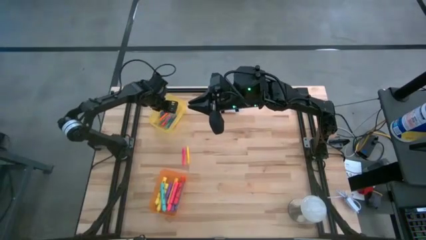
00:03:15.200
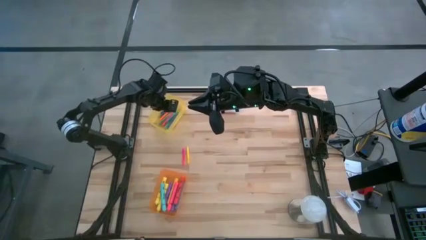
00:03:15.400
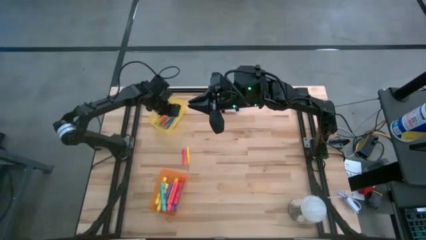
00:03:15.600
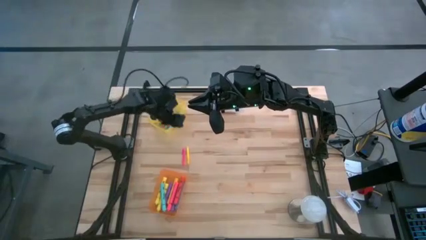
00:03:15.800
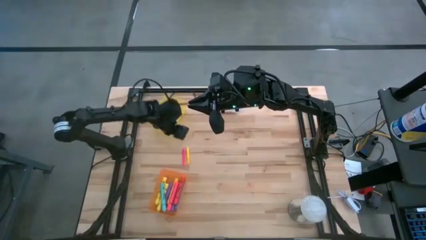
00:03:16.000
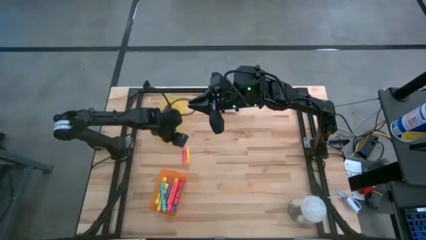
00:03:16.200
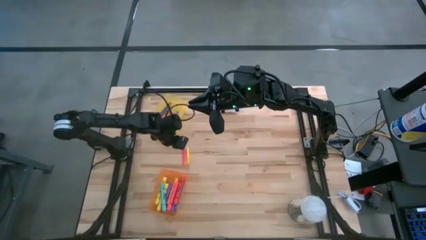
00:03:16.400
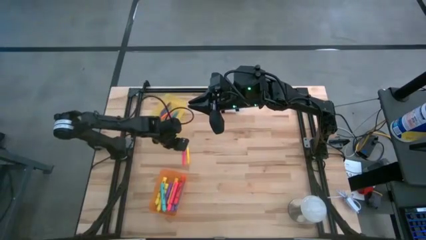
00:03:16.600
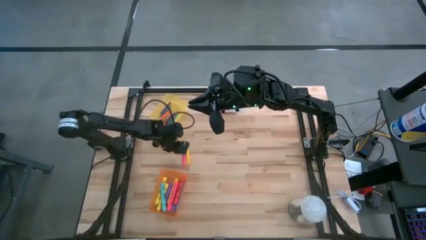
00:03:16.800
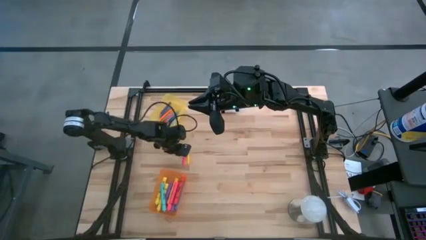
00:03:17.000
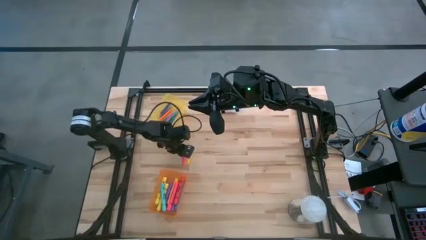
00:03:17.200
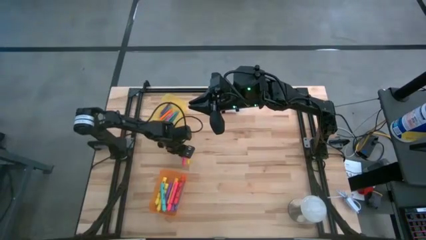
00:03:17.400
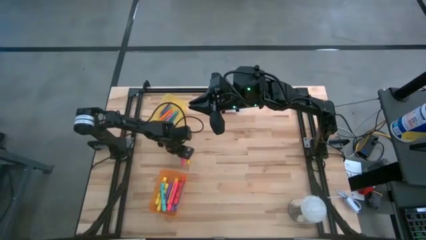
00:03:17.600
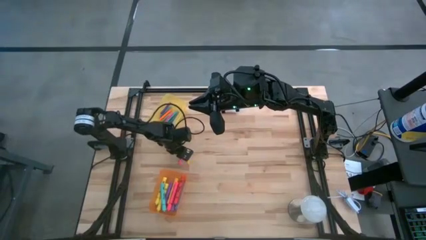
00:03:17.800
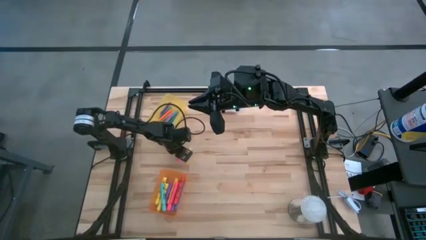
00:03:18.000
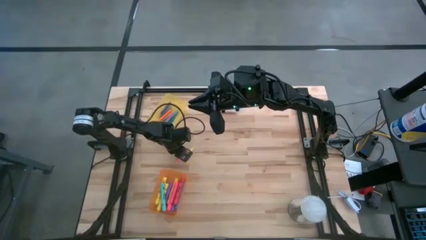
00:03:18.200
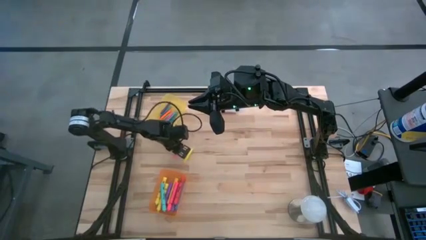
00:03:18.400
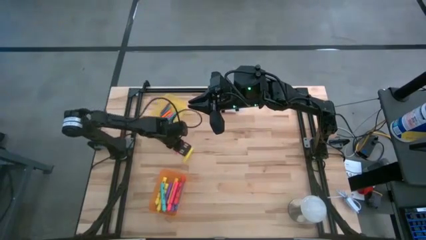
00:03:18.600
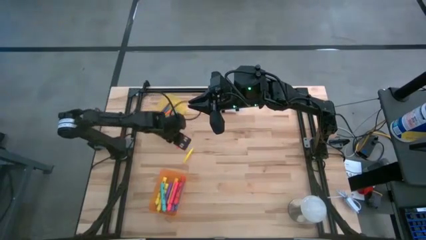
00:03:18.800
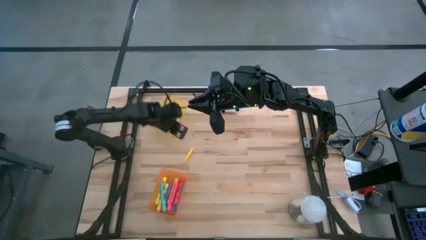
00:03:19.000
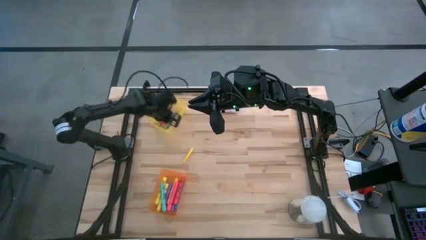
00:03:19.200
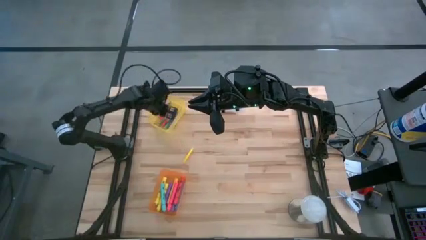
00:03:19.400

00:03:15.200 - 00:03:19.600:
Task: Pick & Place Markers
Put the pink pen into the yellow bin

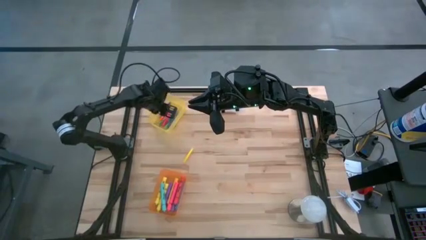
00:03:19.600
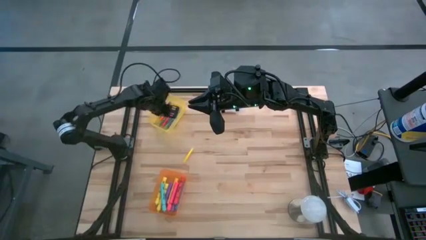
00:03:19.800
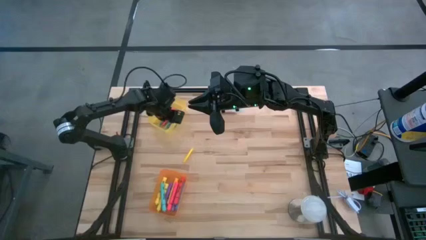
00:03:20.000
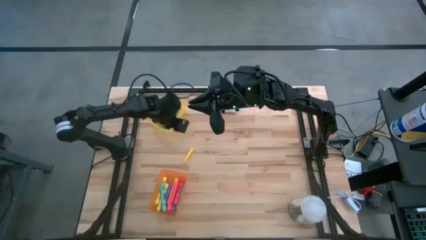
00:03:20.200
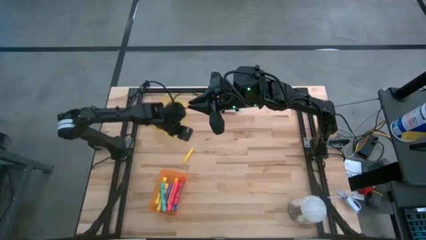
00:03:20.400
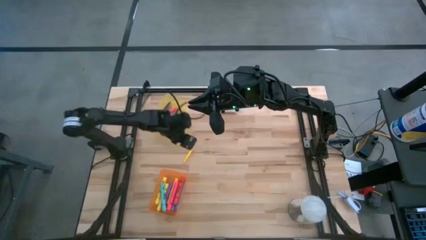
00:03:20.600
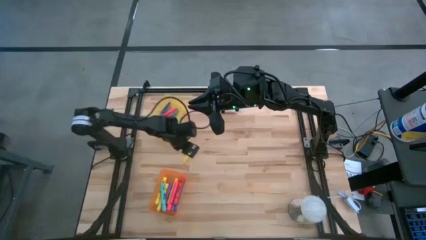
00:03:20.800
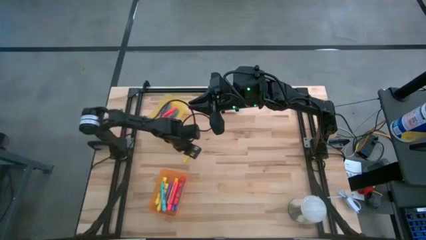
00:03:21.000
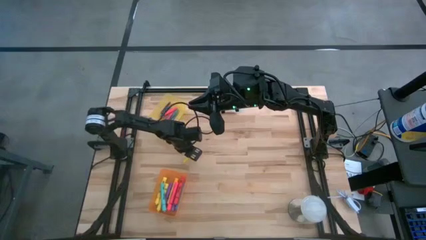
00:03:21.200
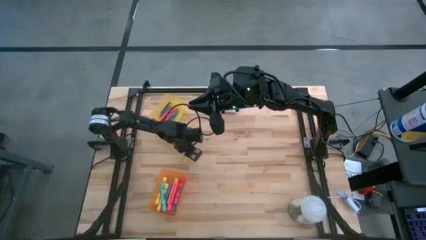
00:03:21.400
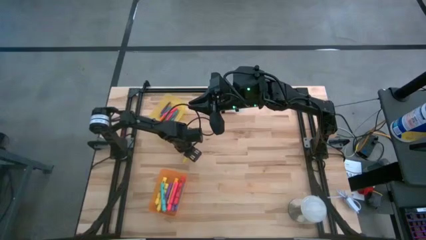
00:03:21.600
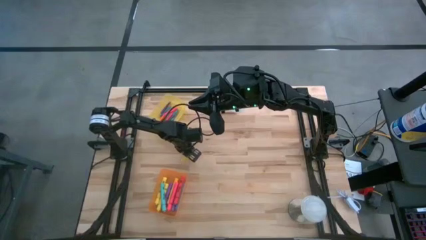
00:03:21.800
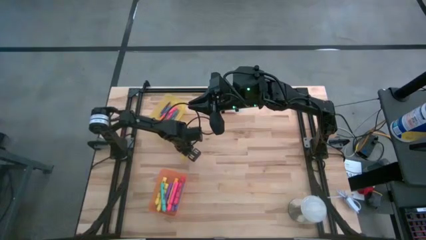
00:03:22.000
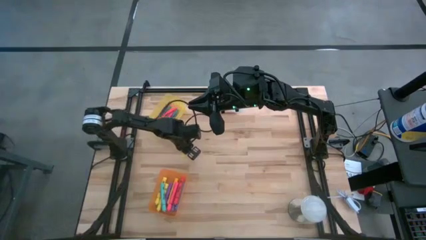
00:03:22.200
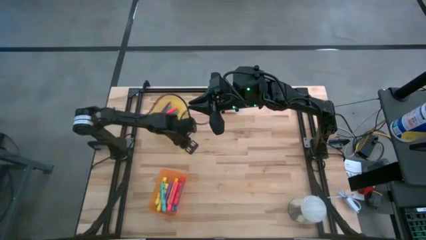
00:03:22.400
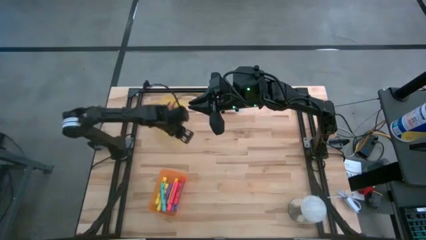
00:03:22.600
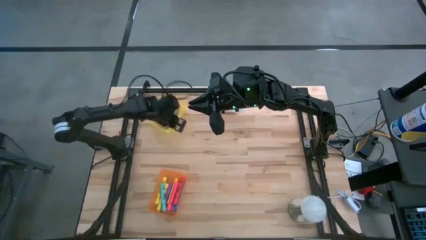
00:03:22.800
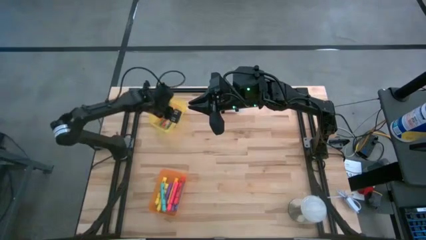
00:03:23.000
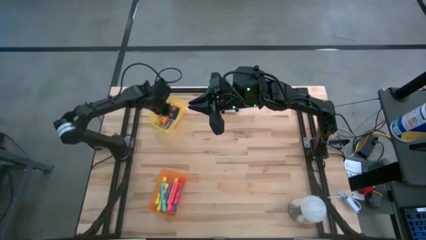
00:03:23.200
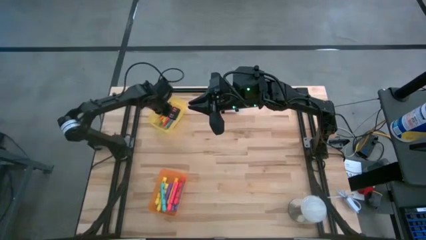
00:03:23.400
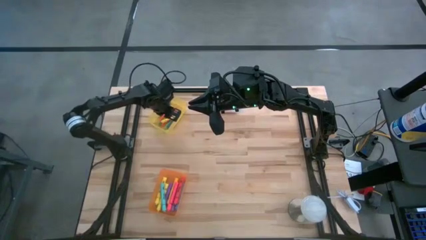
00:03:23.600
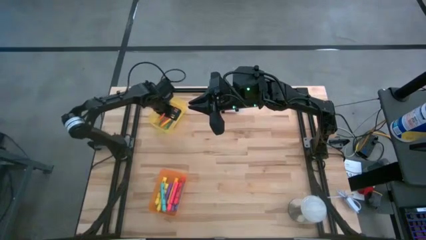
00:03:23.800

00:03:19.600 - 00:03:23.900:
Put the yellow pen into the yellow bin

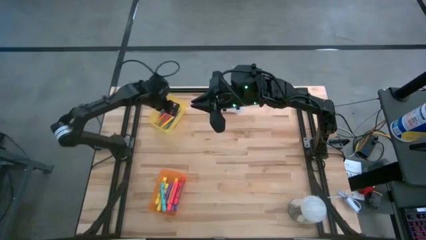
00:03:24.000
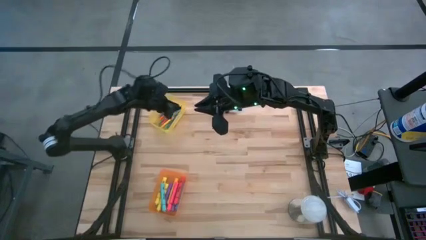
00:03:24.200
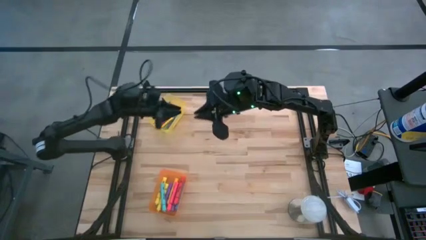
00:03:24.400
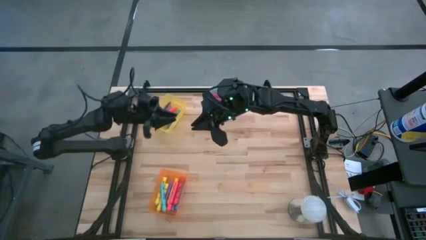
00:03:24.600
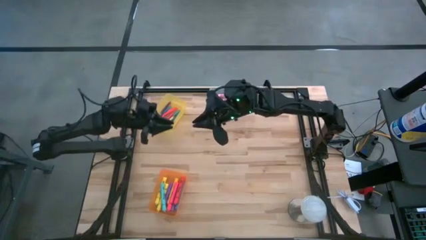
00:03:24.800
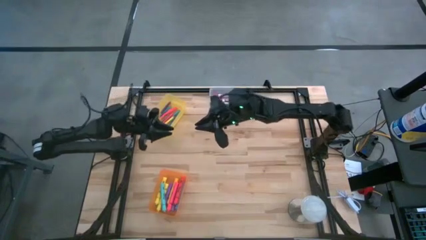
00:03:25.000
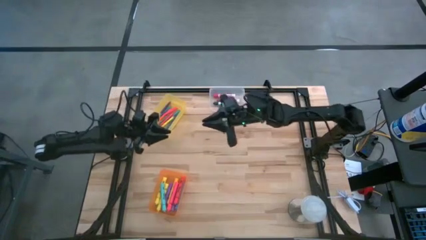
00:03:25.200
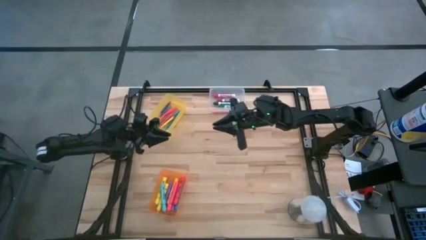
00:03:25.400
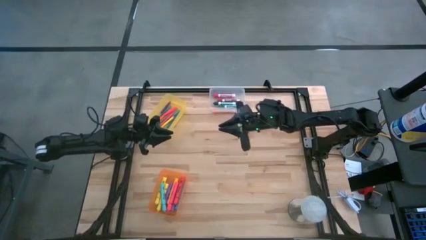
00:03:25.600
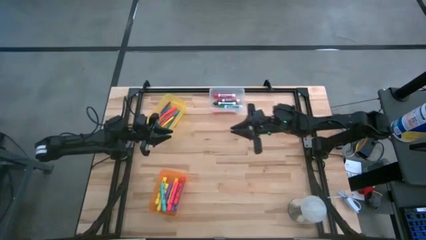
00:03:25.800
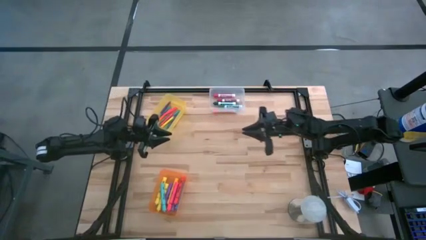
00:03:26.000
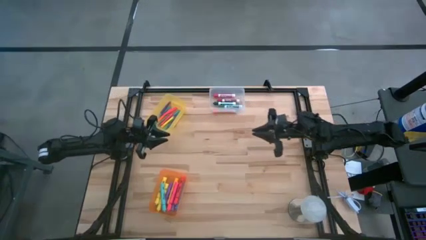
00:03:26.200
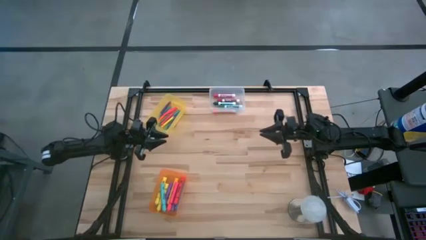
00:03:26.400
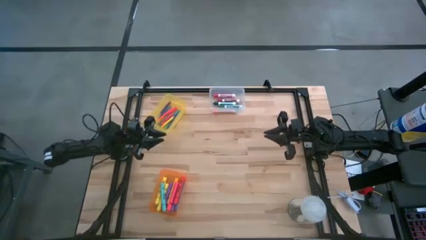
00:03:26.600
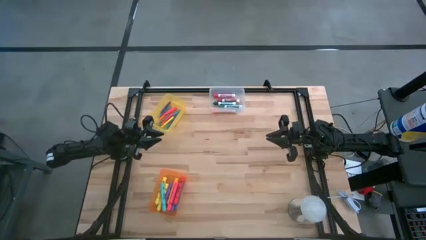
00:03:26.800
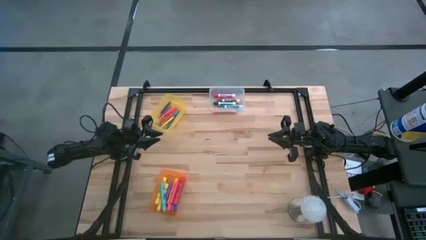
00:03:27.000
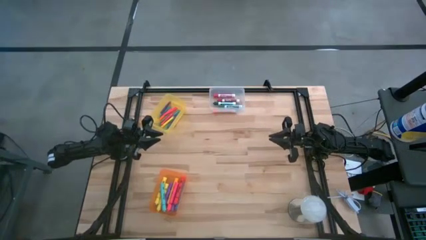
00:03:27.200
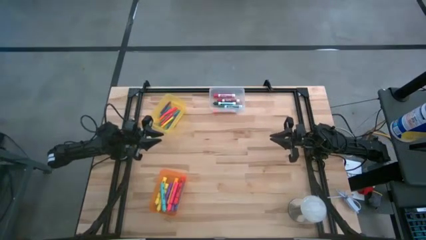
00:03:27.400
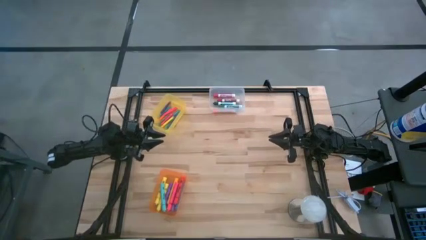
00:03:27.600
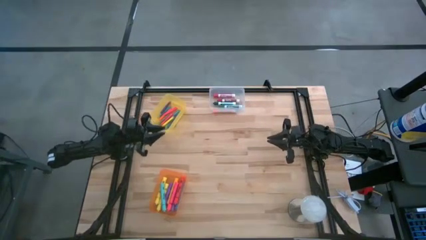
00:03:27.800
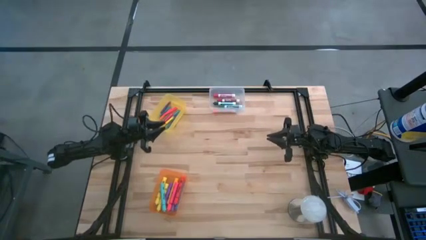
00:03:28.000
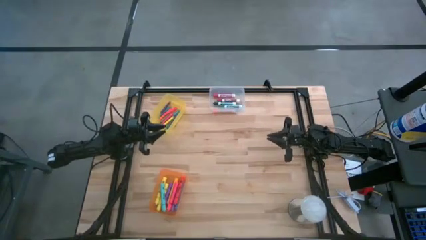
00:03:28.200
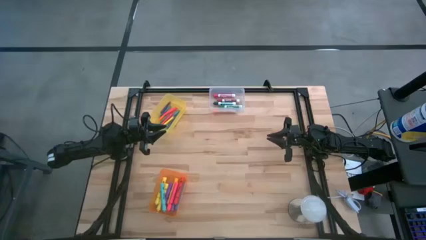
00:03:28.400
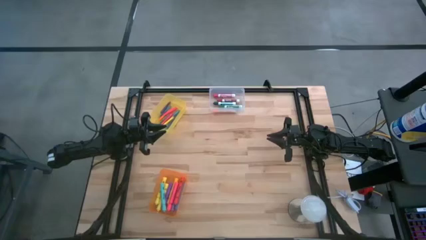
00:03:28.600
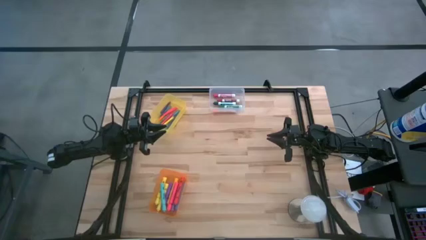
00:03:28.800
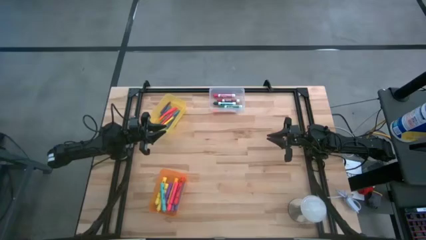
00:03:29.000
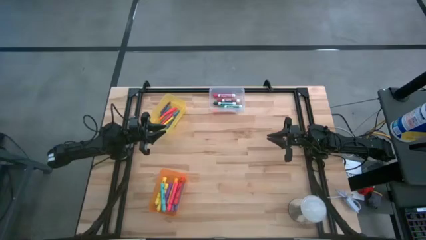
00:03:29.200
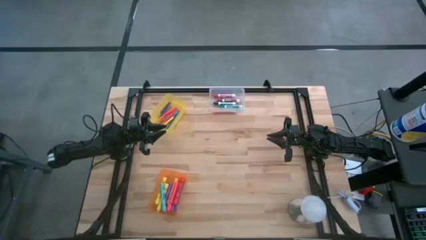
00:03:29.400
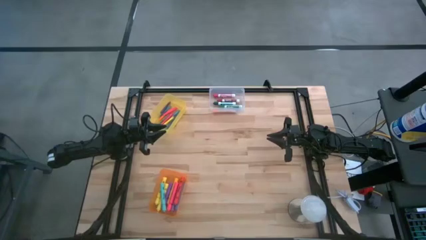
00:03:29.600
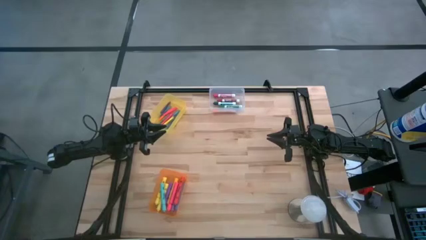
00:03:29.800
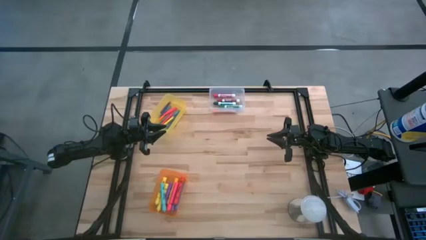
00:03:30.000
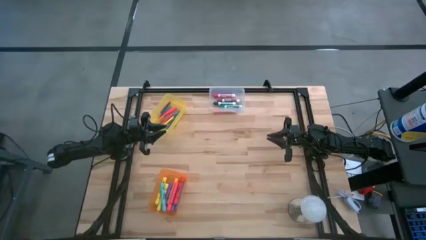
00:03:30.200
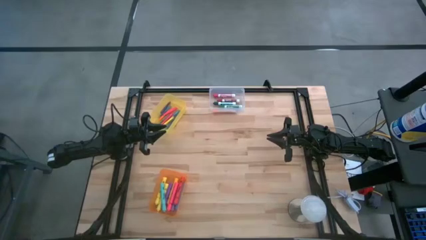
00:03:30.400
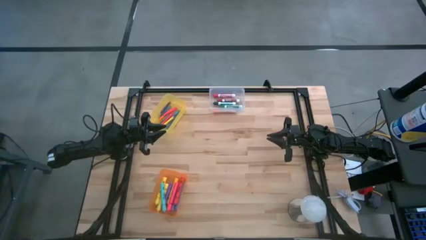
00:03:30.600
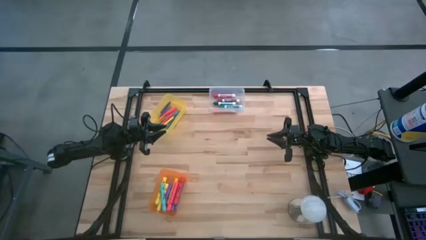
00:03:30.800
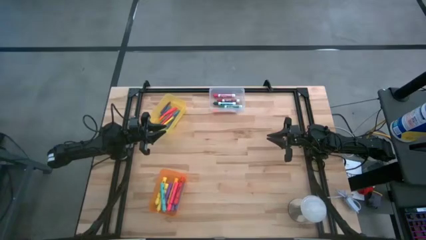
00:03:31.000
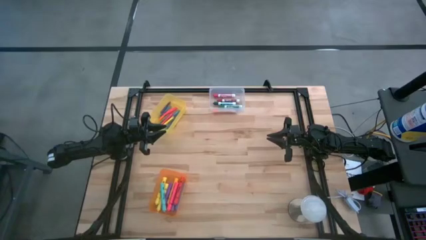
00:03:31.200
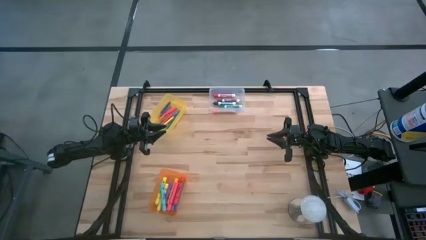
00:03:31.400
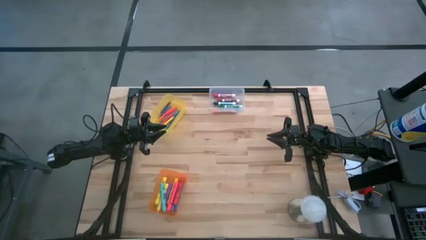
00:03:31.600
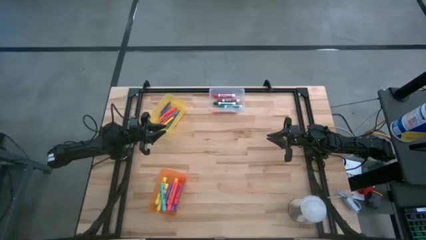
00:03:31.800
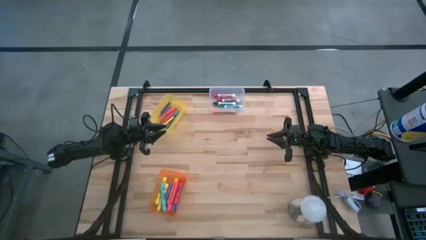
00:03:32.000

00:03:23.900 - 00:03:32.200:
Return to Home Position
